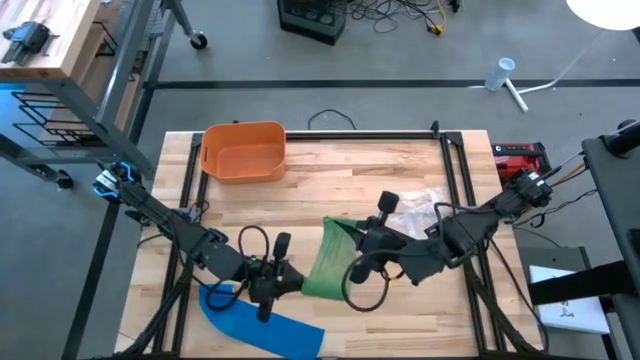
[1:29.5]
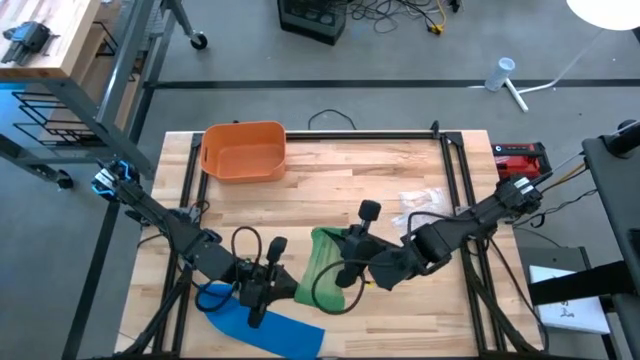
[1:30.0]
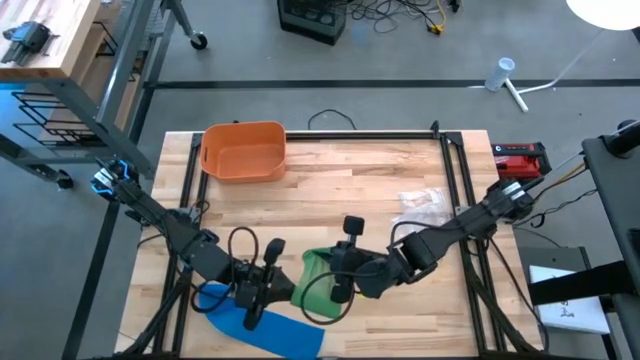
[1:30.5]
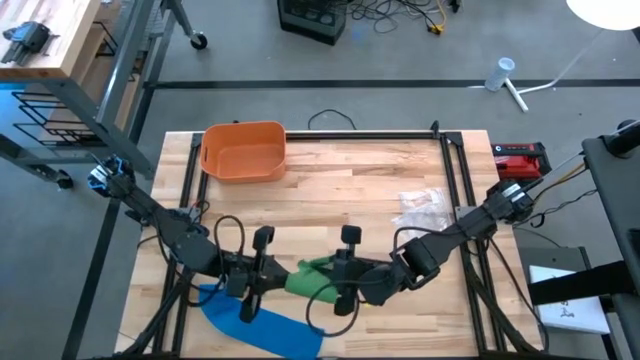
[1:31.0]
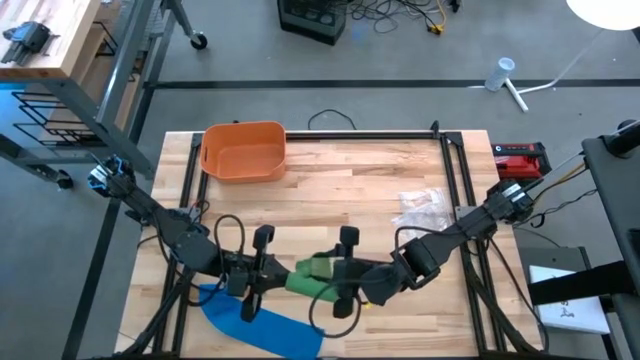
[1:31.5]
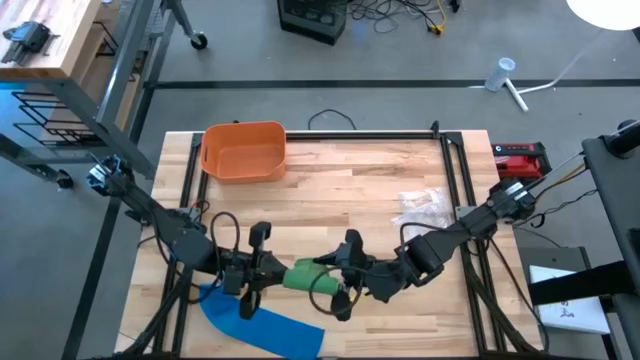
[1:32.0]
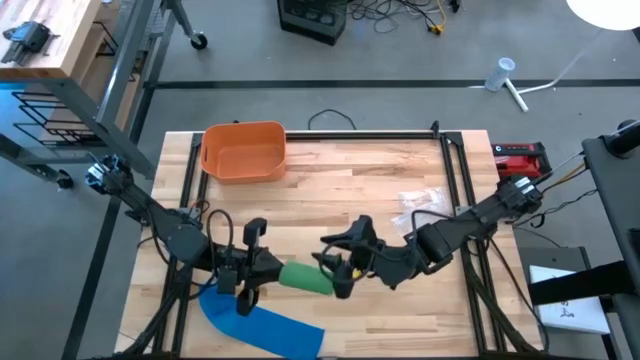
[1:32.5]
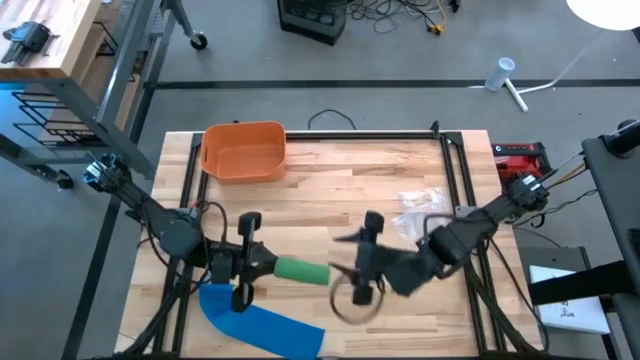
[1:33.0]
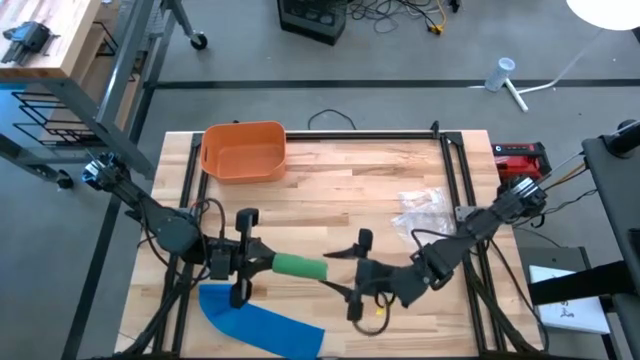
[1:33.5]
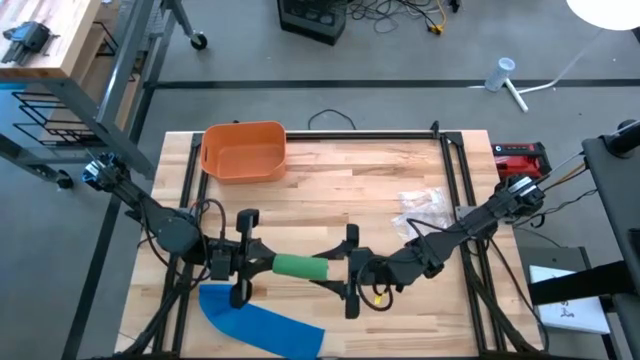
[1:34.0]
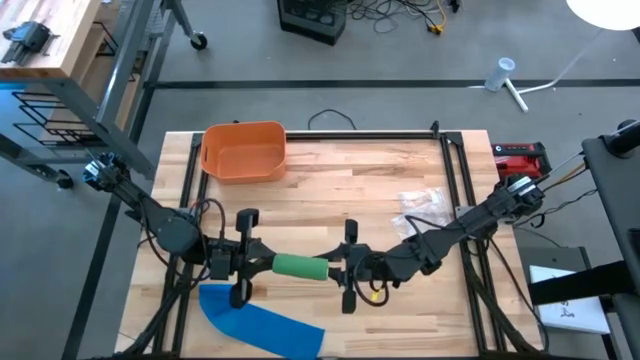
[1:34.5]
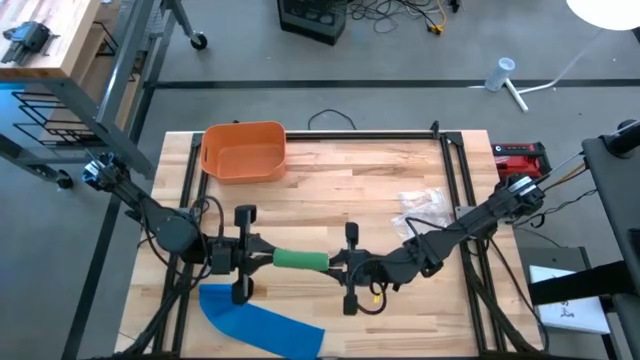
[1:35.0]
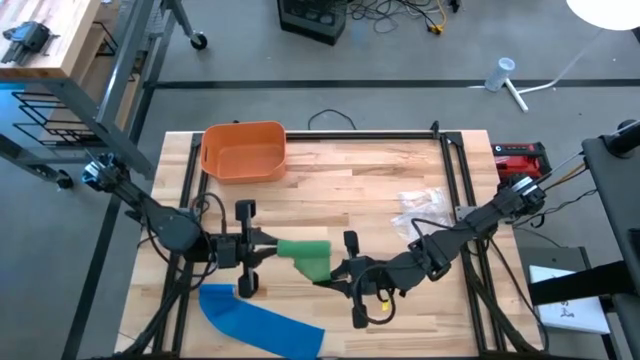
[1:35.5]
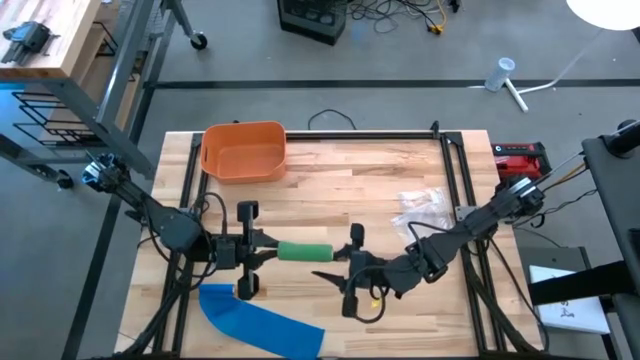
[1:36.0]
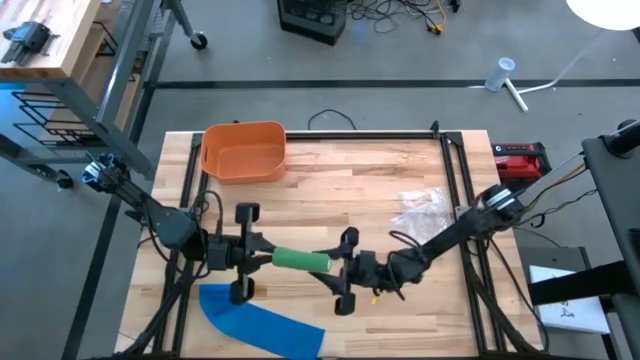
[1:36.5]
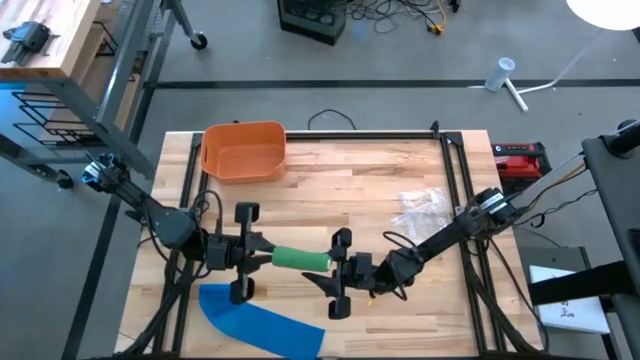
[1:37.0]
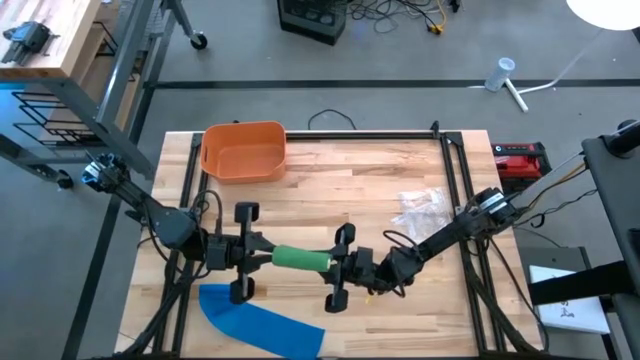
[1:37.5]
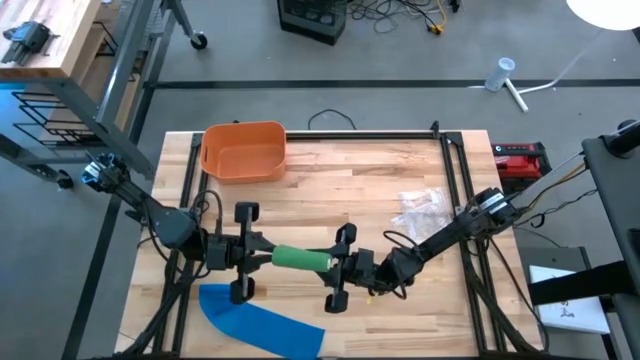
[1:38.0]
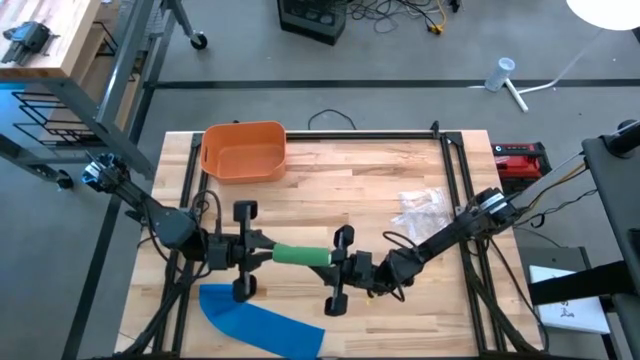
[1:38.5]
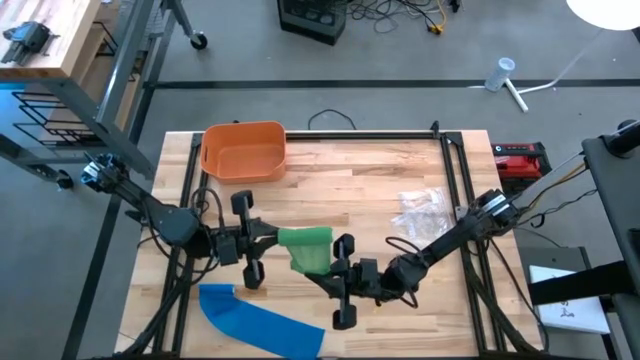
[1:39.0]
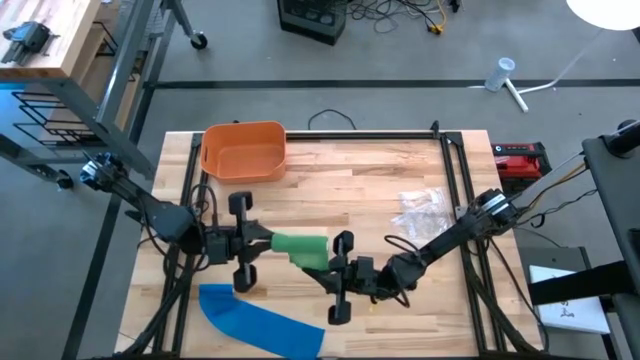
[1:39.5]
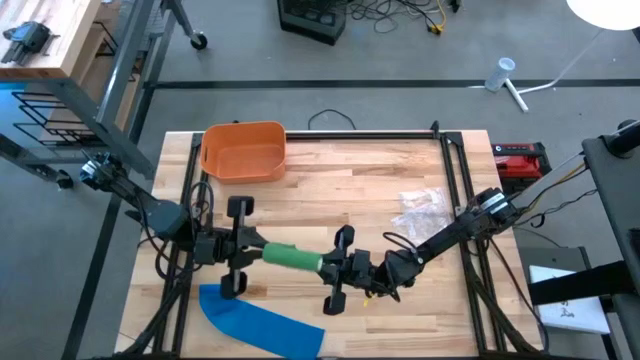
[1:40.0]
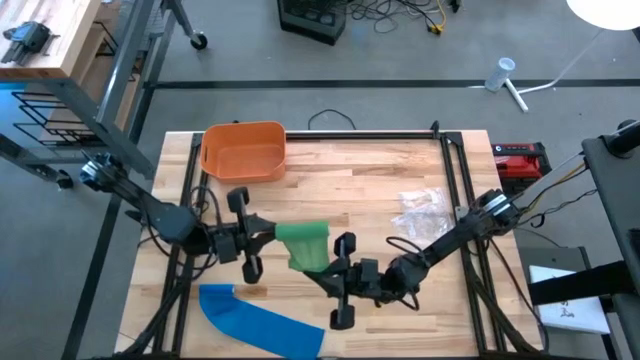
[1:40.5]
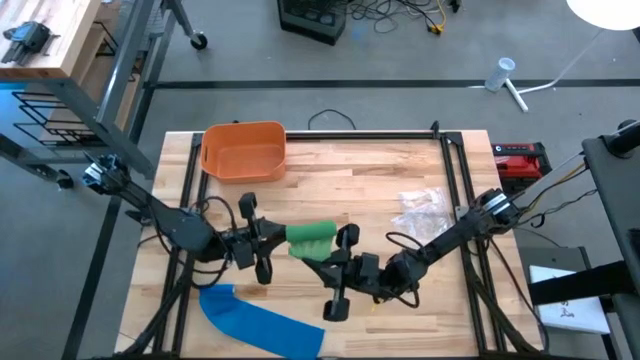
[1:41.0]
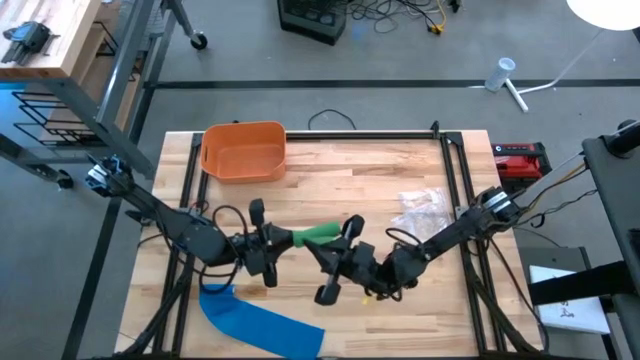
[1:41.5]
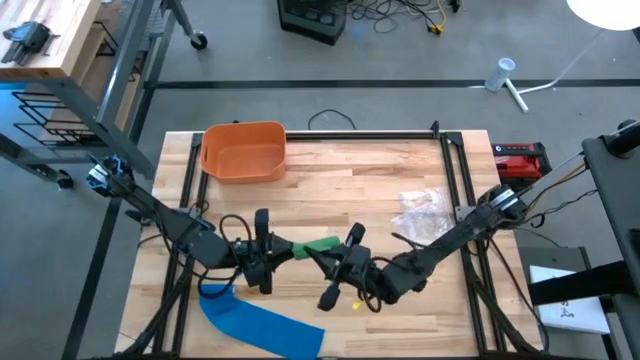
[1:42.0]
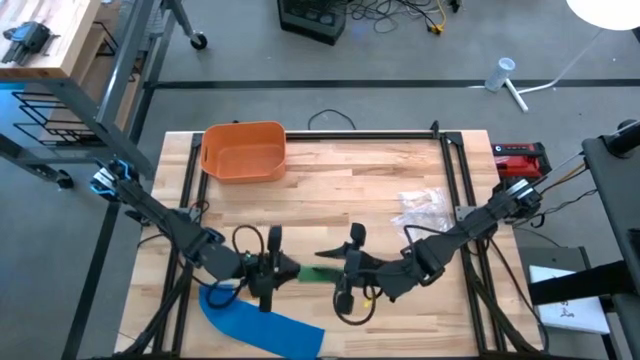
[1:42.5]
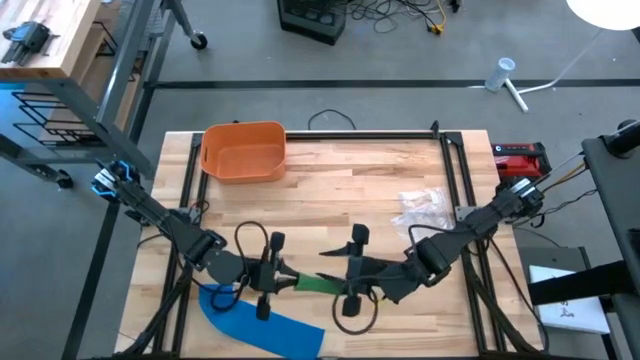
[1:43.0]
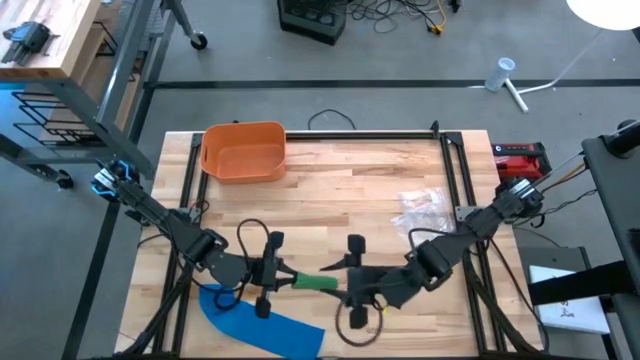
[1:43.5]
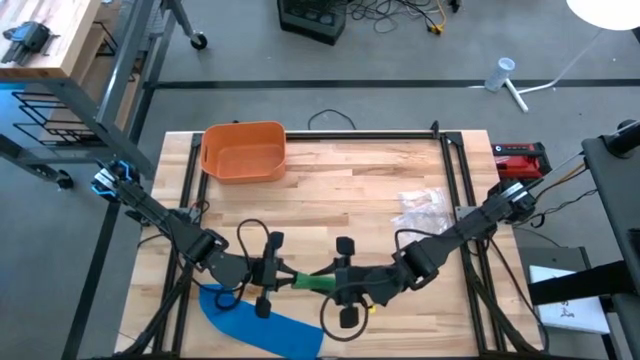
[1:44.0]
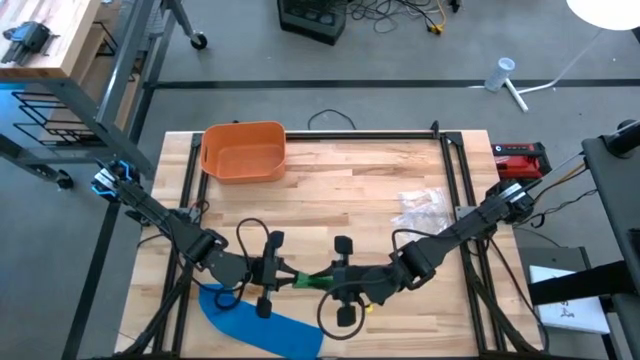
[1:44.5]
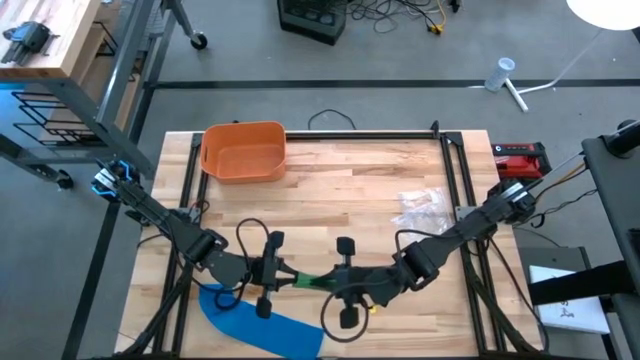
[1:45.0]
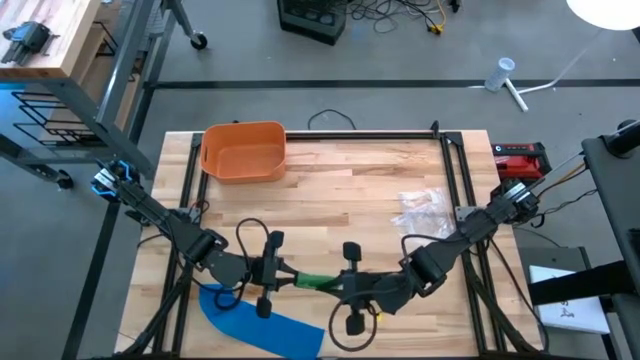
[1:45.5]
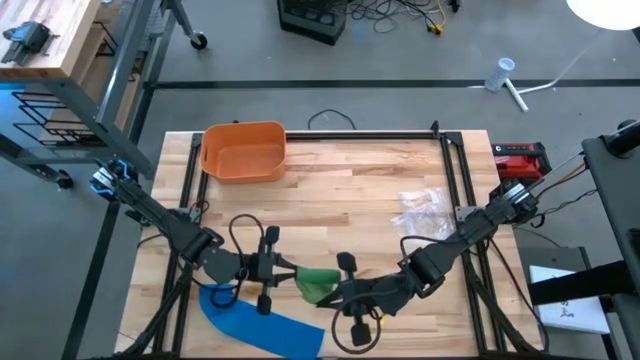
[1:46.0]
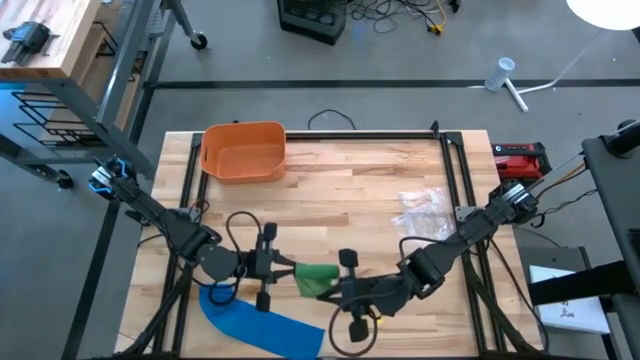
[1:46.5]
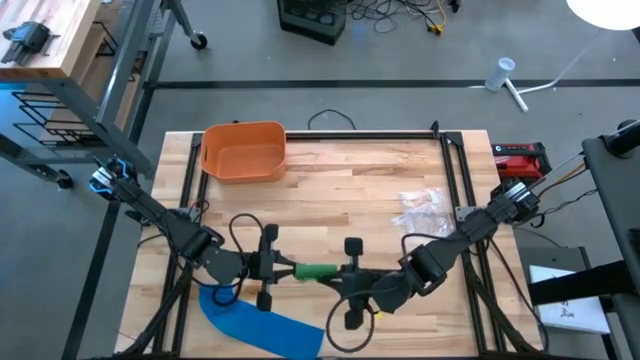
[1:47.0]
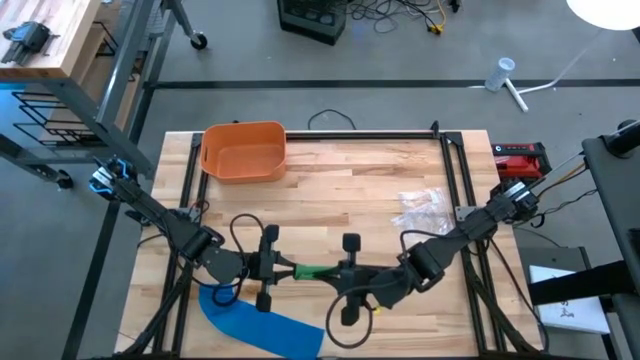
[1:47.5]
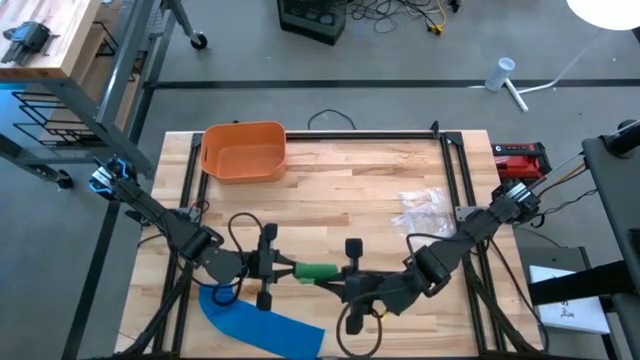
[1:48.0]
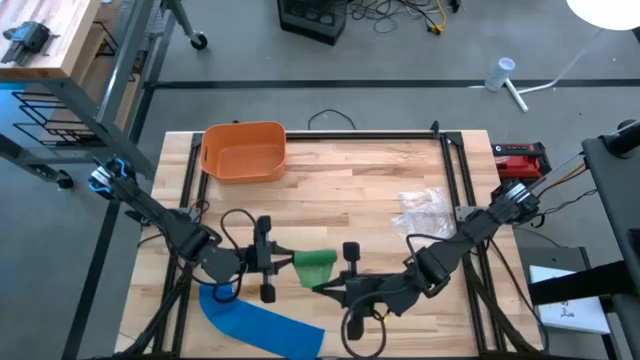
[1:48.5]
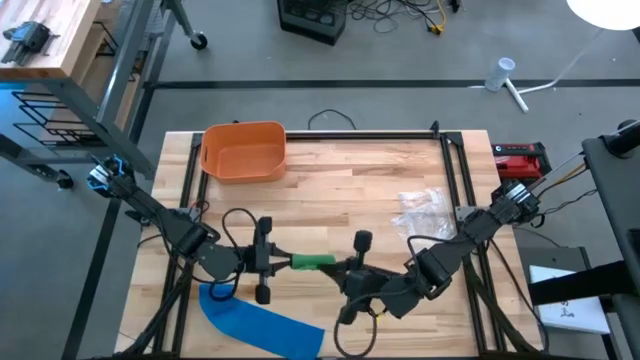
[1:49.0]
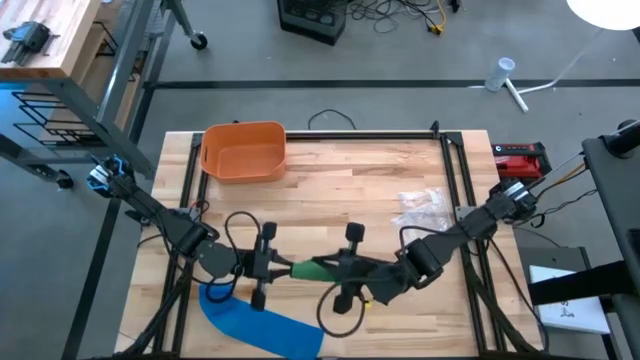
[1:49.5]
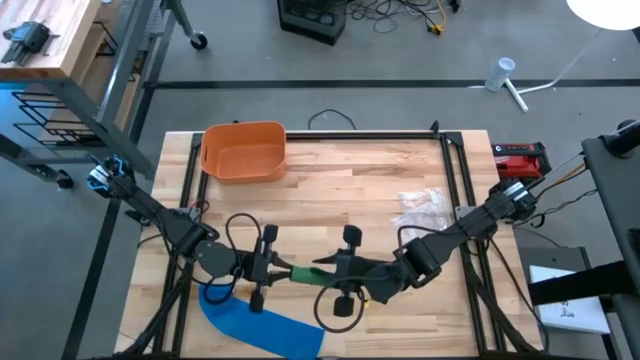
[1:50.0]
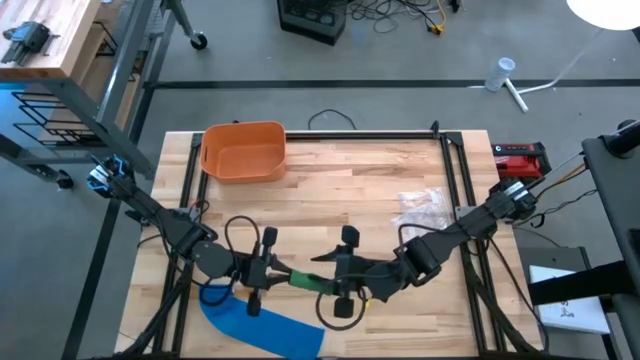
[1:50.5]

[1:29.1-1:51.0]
Task: Roll bandage
Roll the green bandage

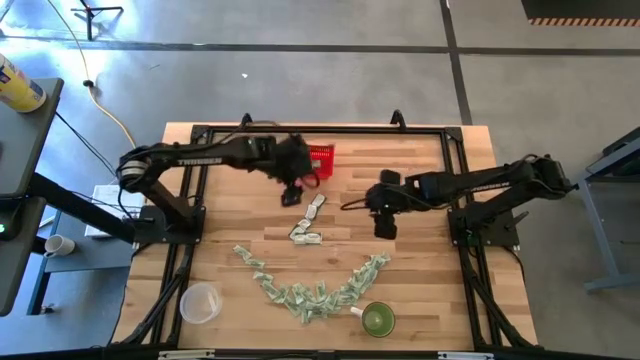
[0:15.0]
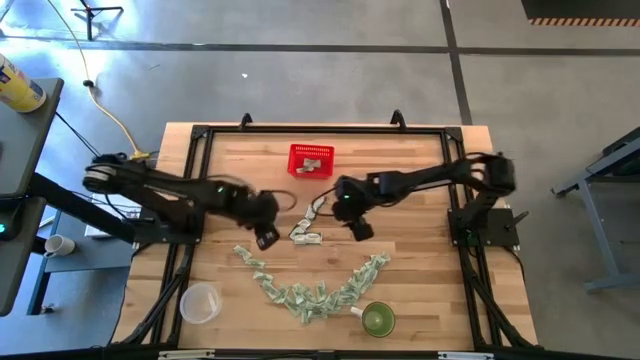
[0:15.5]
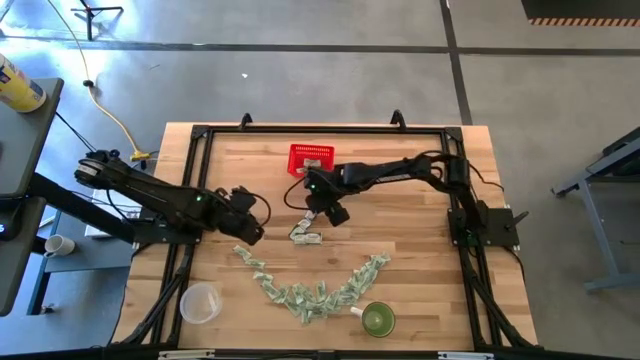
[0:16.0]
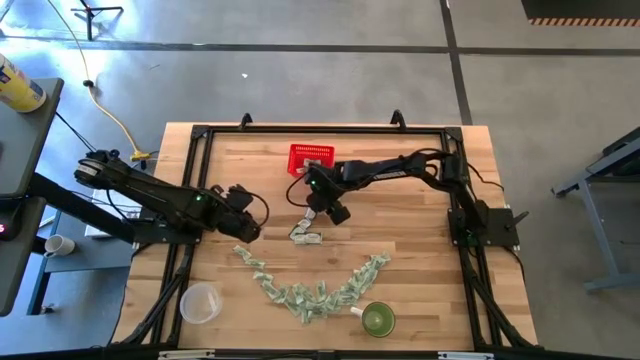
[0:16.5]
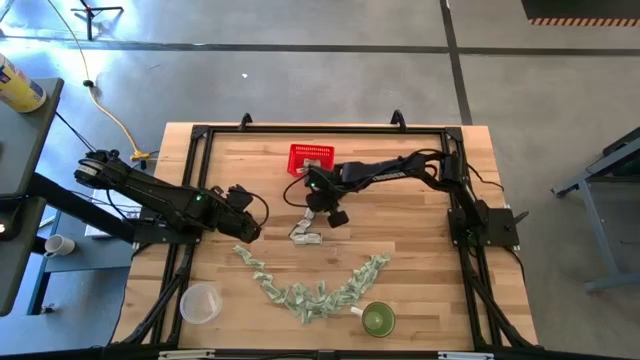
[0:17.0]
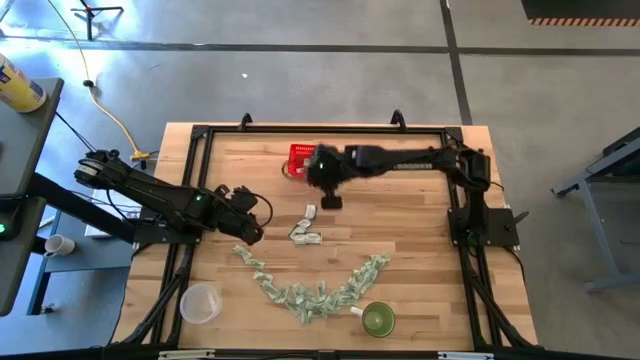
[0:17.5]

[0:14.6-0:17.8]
Task: Pick and place items into bin
Put the green stevia packet into the red bin
